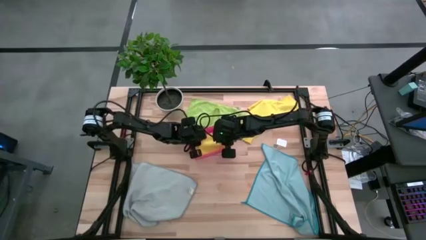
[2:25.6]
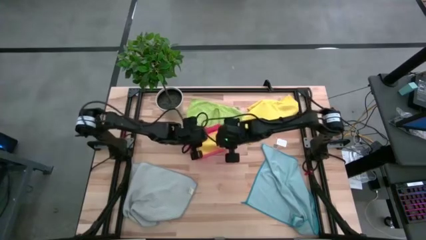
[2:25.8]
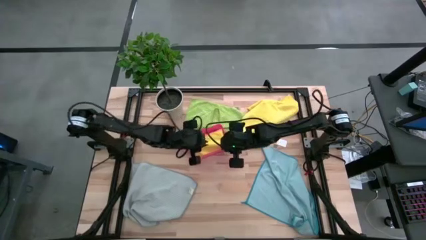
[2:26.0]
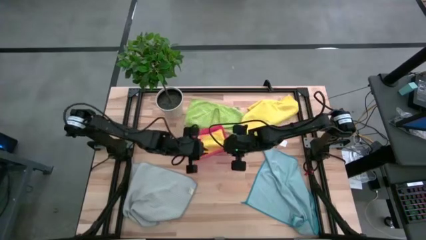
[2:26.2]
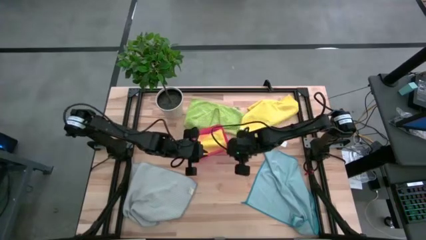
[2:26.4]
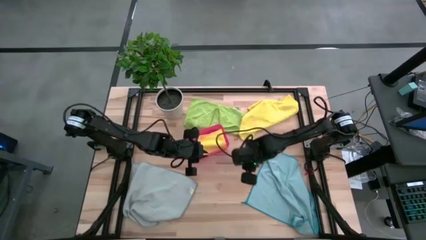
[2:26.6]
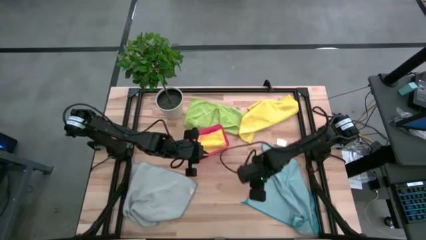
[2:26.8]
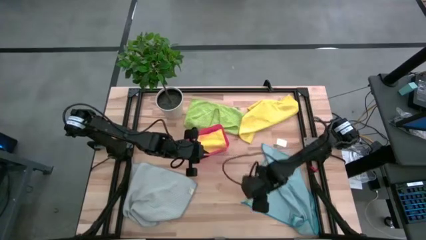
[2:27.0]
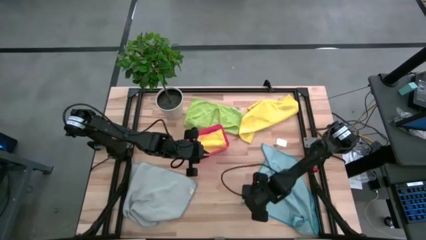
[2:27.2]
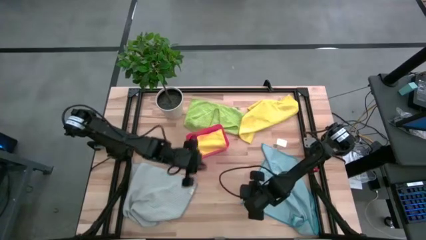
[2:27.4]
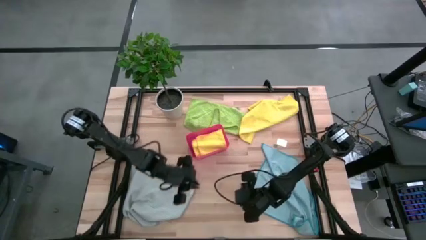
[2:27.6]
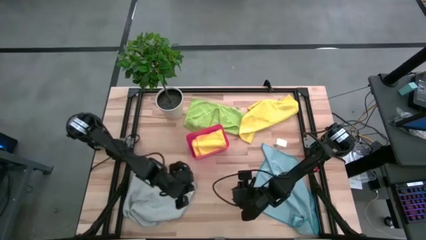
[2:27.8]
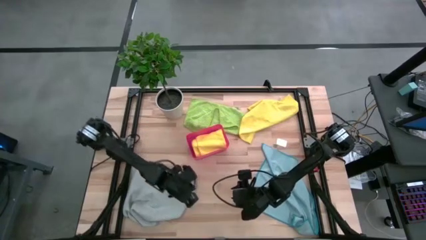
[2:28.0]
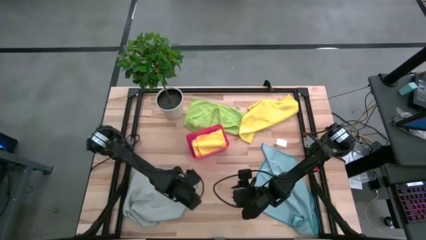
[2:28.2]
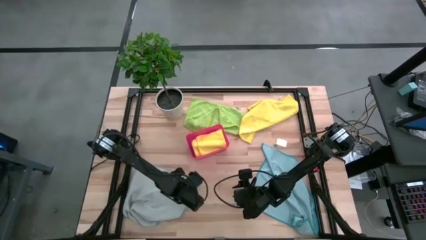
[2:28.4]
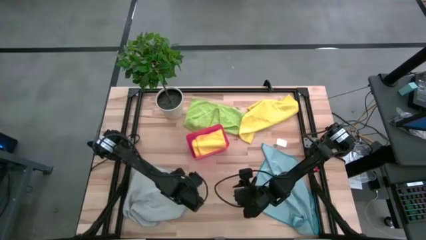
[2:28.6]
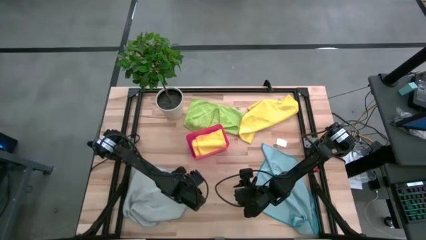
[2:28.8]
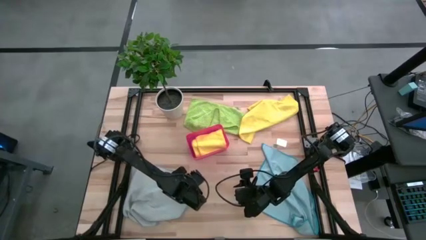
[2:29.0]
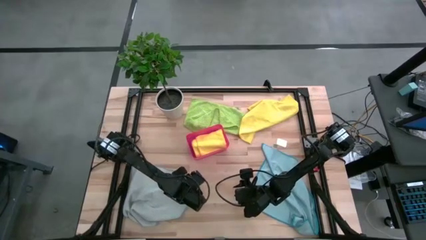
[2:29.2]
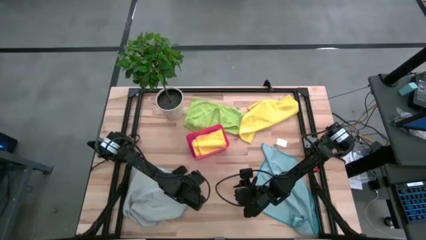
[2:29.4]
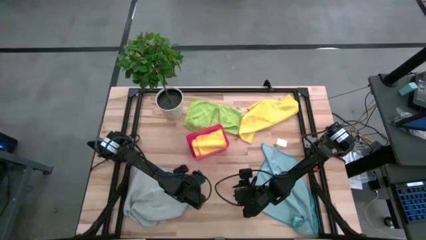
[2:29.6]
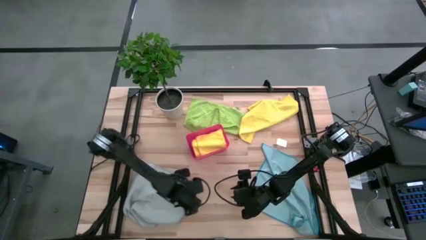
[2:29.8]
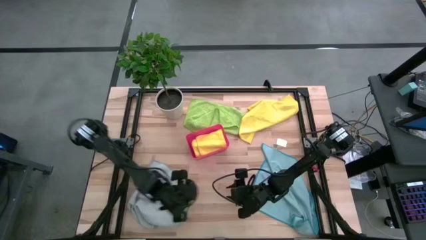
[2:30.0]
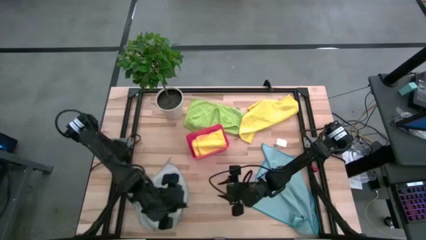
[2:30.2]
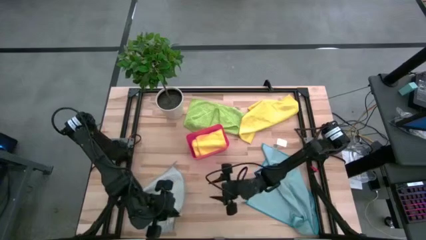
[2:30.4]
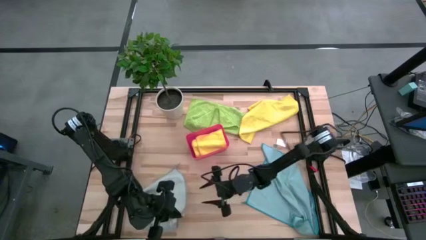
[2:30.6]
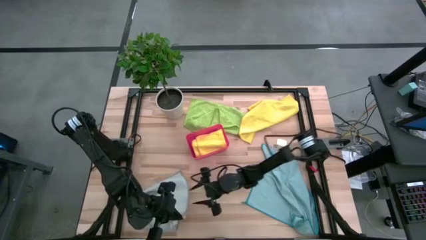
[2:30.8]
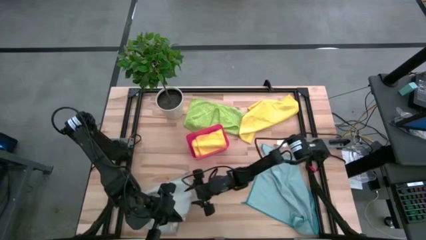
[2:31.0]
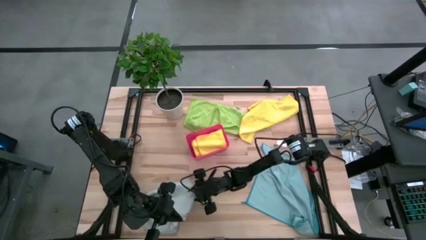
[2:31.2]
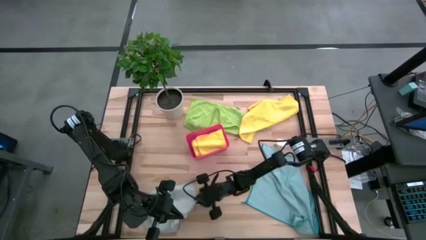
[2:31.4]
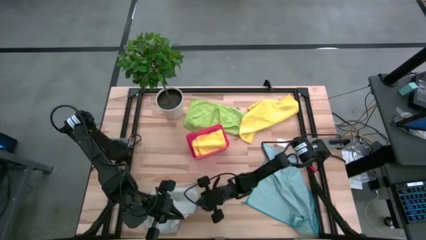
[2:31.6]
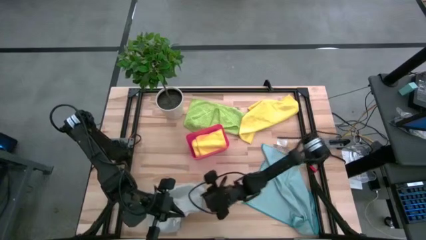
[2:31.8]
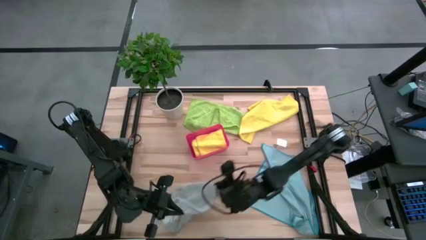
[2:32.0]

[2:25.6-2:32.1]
Task: Fold microfiber towels
Fold the gray microfiber cloth

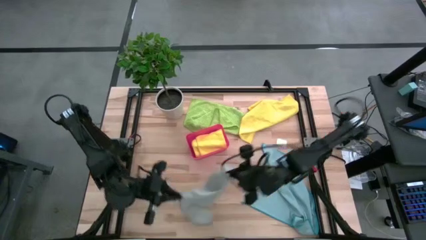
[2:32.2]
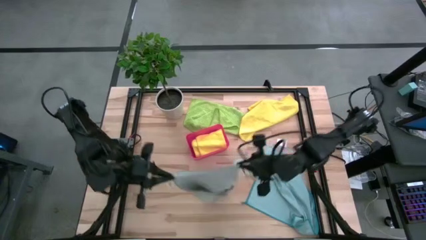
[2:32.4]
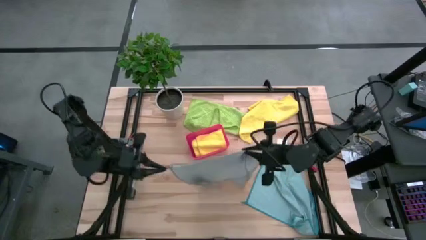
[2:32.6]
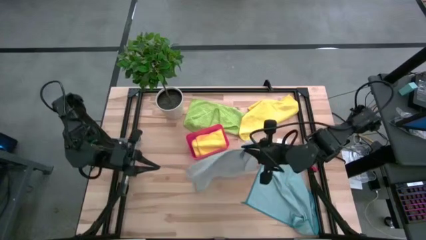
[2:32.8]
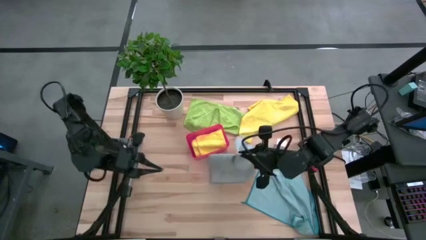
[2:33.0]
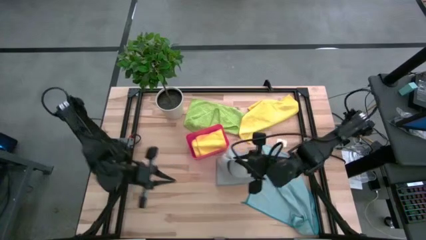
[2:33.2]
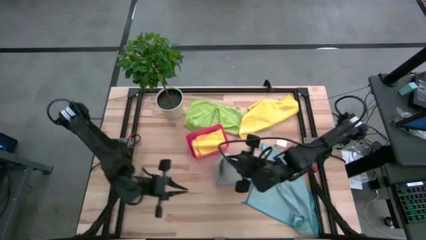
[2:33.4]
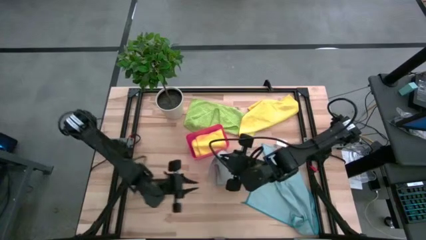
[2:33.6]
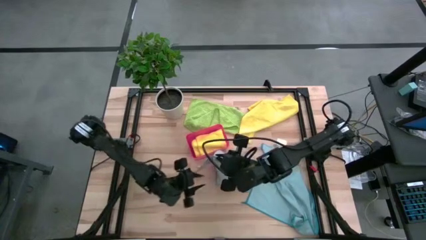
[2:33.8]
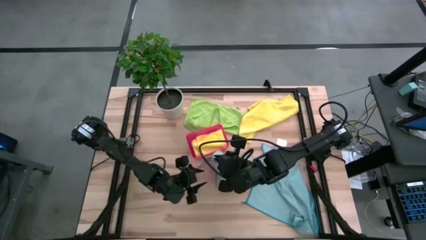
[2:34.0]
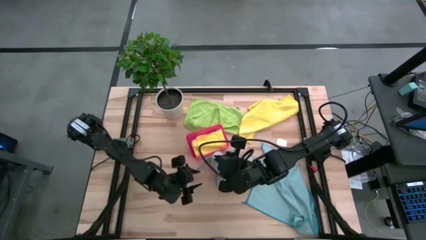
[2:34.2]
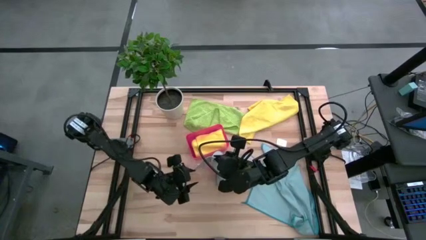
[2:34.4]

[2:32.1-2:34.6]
Fold the gray microfiber cloth

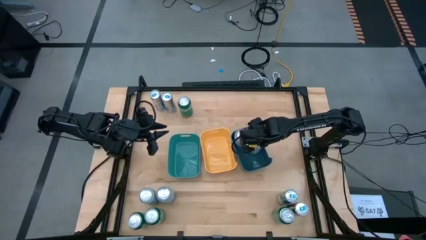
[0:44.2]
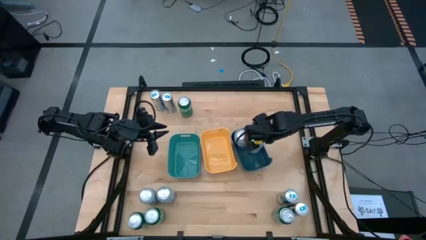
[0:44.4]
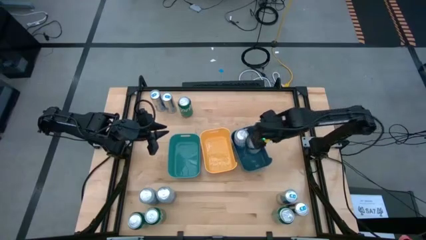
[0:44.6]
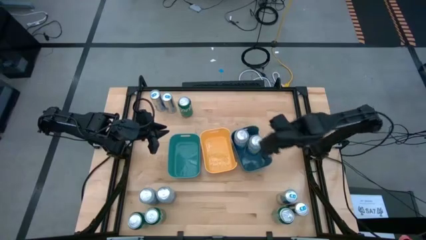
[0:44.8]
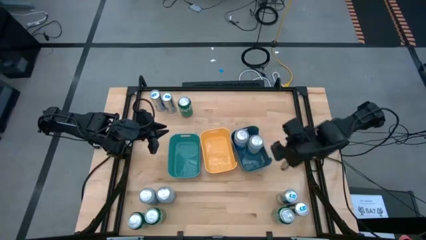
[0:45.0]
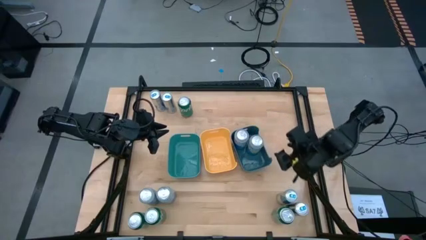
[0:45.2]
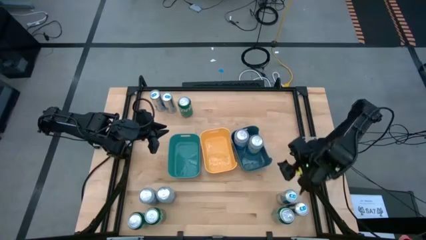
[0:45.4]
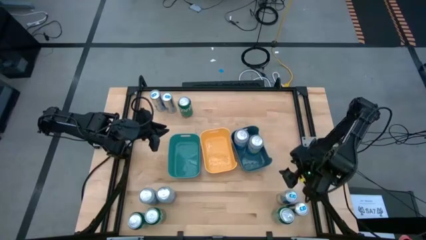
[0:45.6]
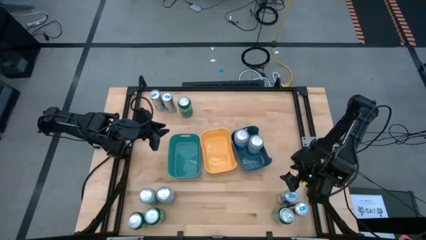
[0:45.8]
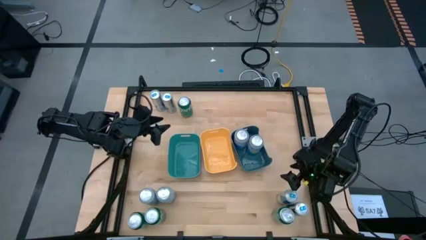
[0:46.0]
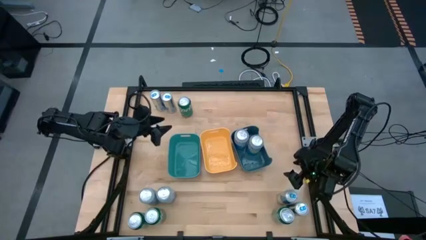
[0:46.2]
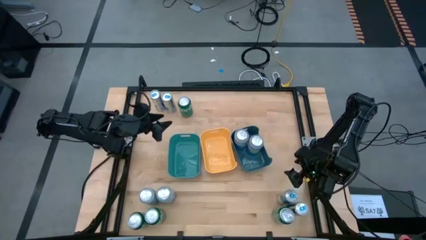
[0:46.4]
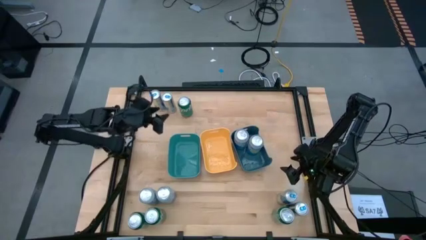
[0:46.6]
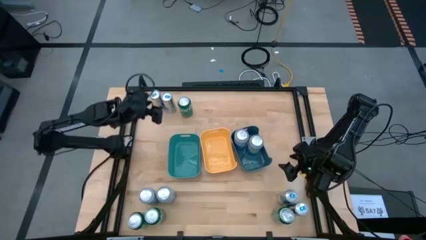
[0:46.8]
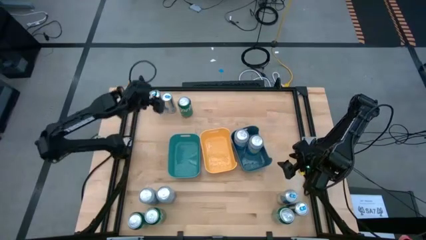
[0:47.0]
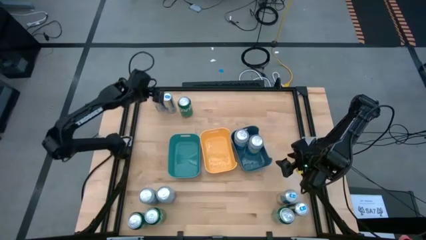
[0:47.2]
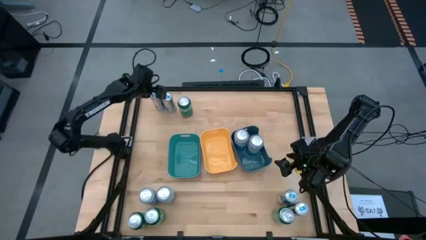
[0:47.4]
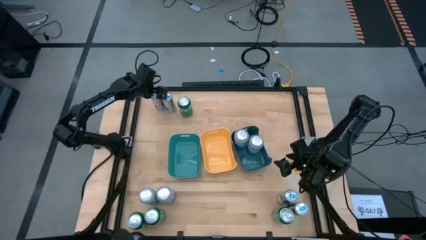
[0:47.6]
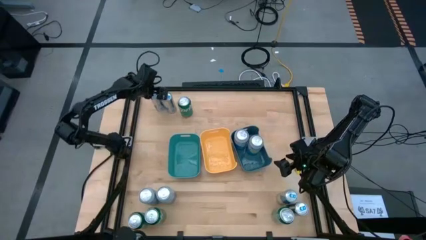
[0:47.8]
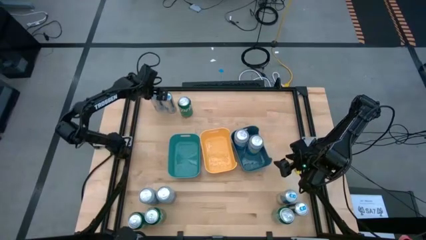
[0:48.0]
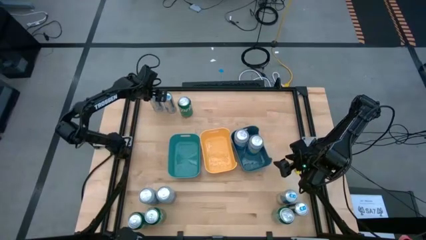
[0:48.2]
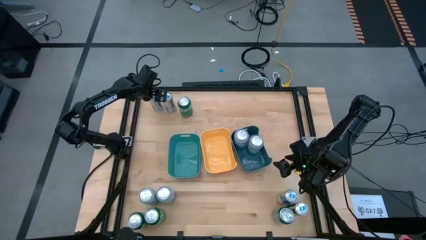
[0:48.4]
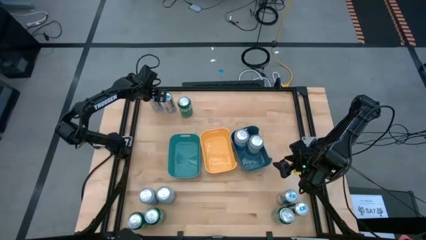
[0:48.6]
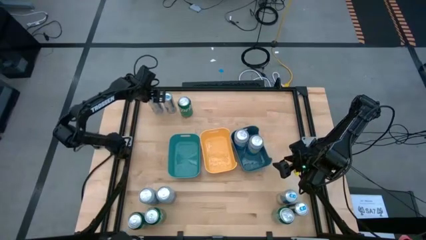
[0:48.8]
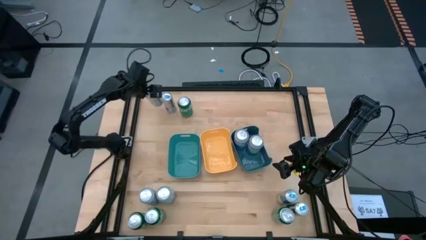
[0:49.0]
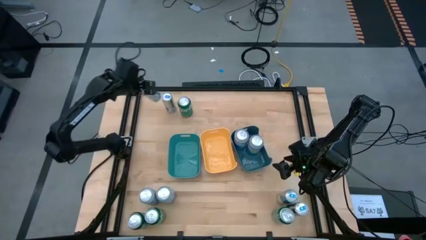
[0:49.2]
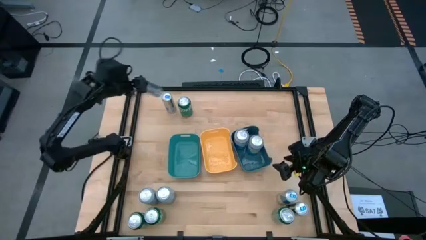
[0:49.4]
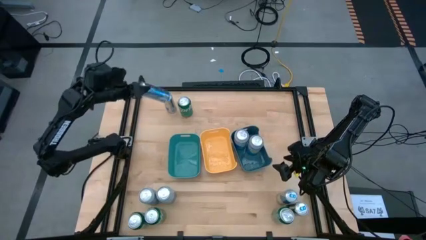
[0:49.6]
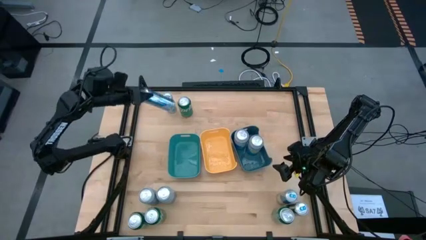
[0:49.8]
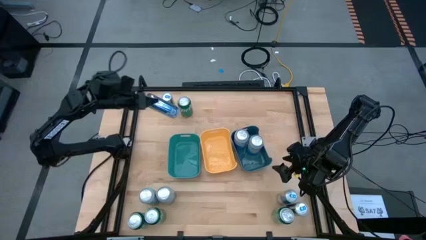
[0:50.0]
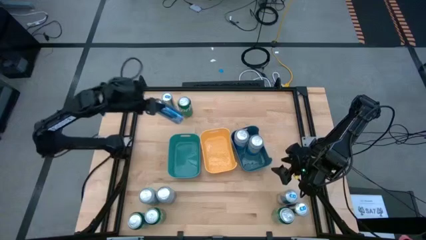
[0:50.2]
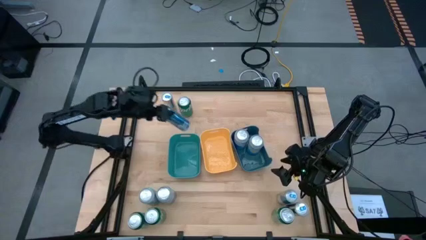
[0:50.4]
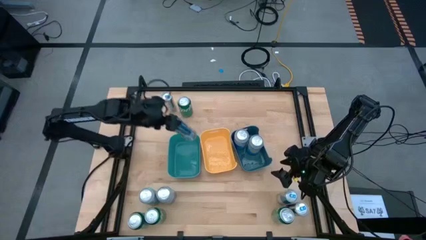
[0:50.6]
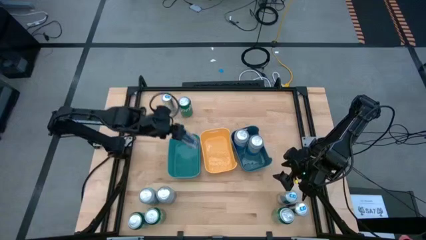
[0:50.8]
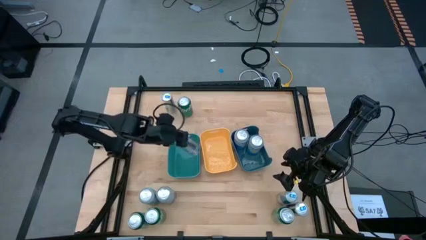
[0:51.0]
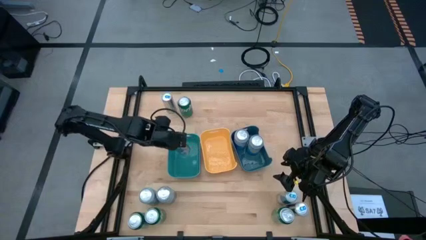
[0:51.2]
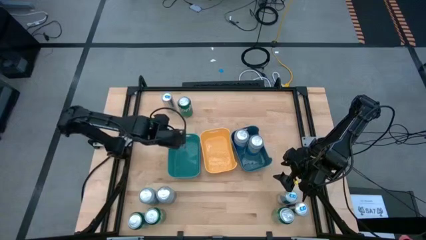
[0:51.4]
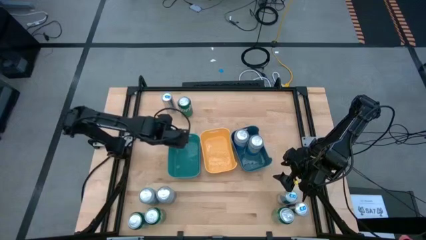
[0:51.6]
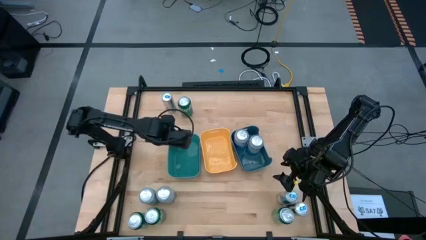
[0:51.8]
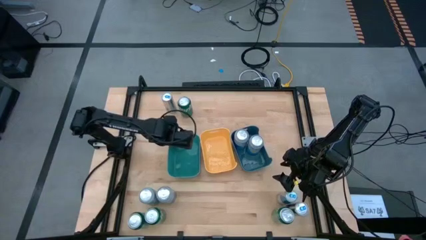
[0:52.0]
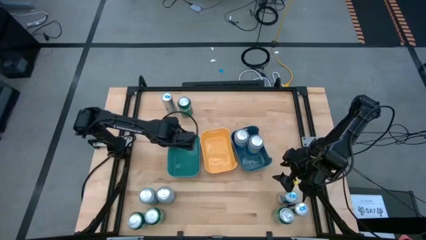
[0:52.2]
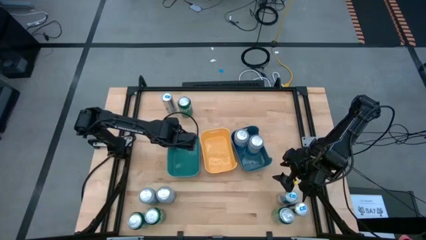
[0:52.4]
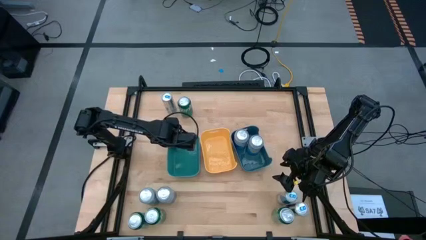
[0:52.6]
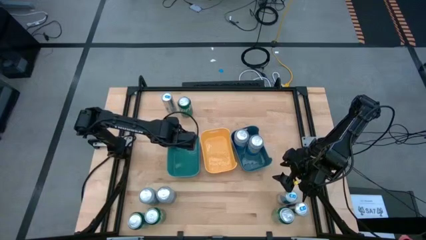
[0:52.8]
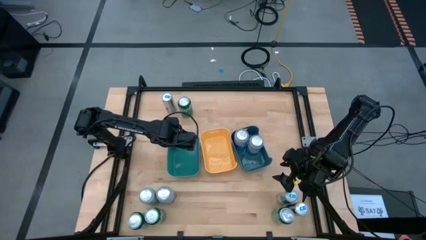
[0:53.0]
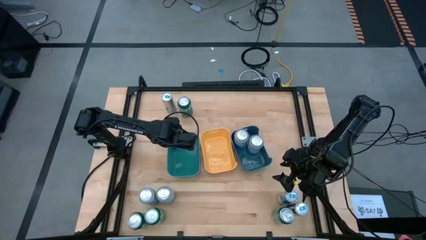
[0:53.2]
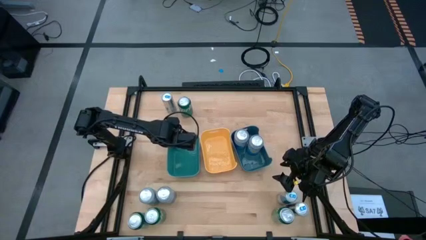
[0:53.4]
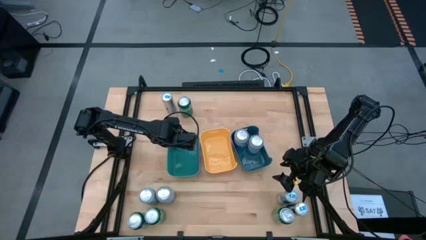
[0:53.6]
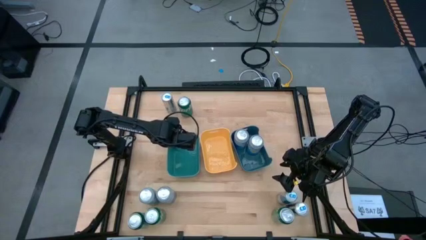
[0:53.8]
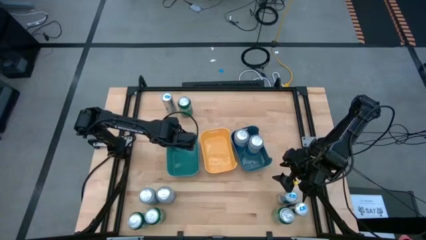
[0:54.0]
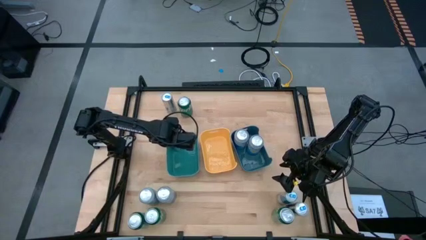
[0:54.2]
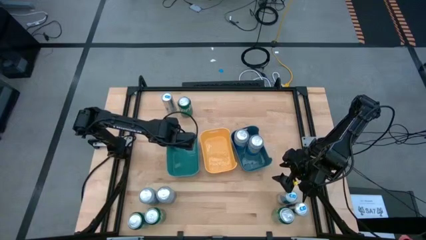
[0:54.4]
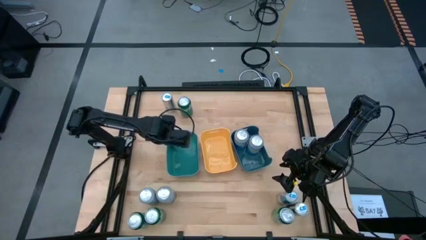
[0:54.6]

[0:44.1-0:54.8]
Task: Sort soda cans
Put the white and blue soda can into the light blue bin
